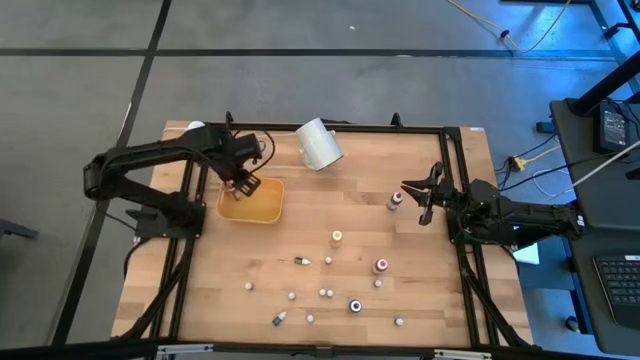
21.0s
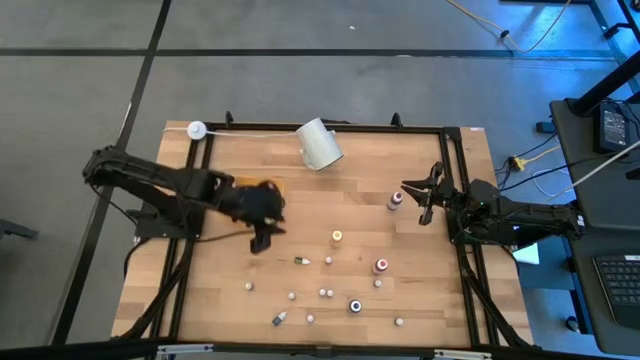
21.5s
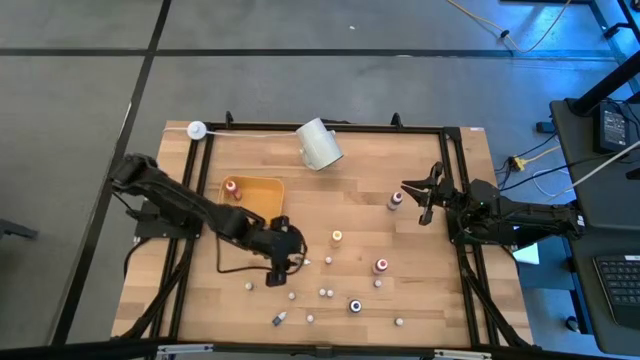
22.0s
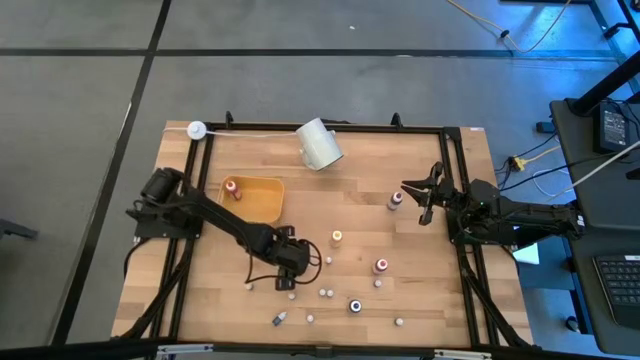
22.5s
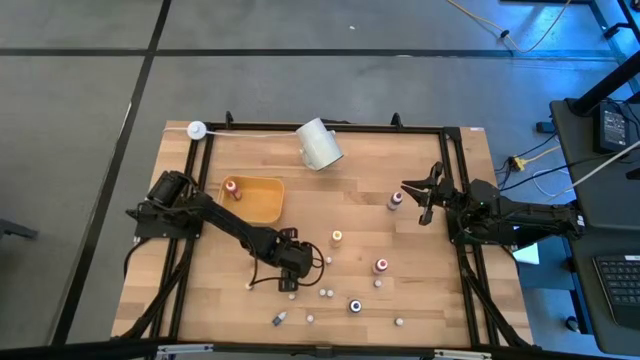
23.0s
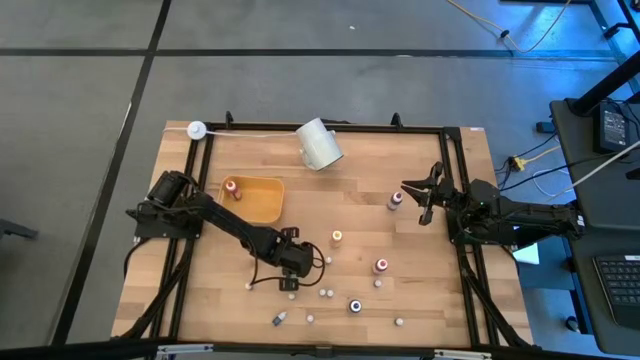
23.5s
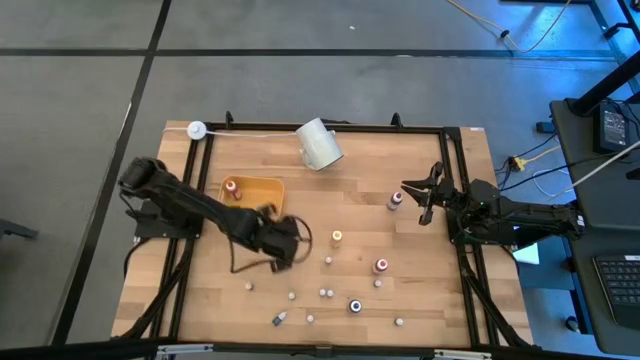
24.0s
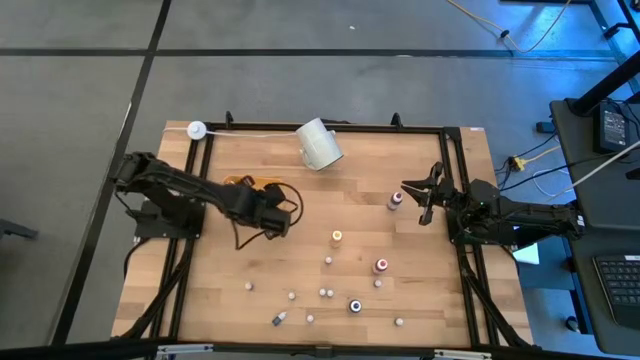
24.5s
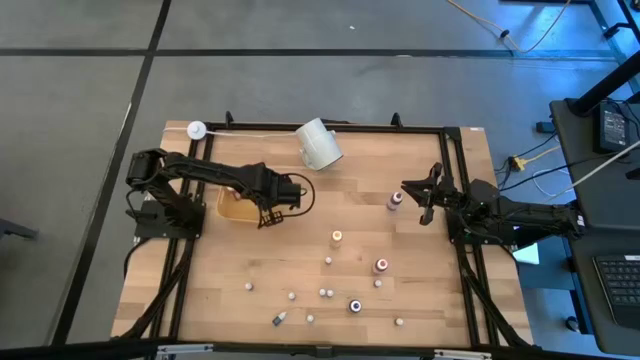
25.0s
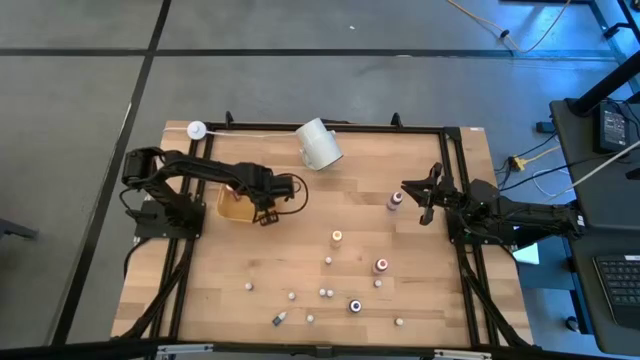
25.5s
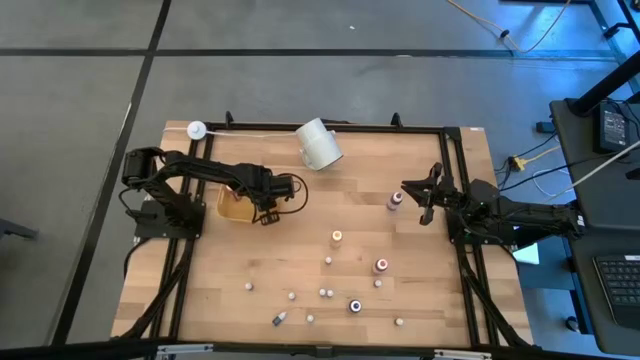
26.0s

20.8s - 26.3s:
Task: Pick & Place food coloring
Put the top small green food coloring bottle into the bin

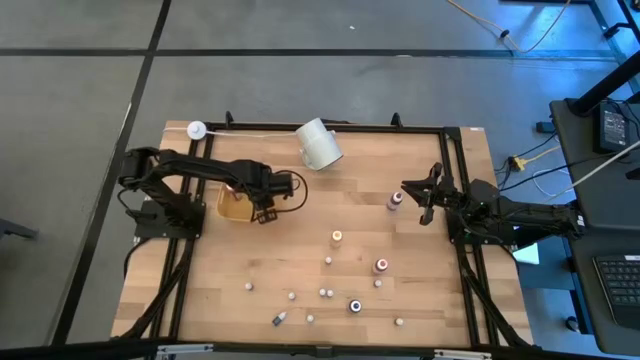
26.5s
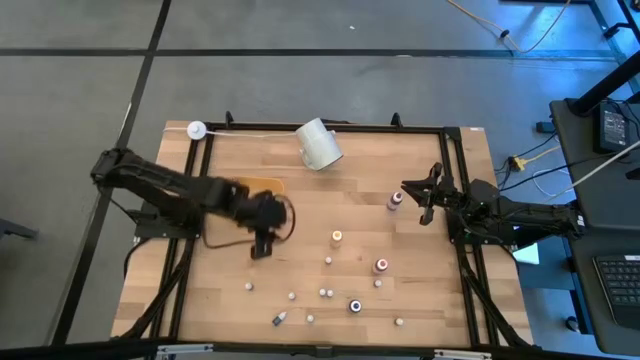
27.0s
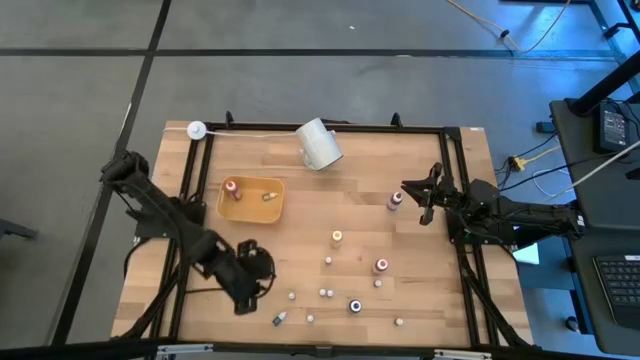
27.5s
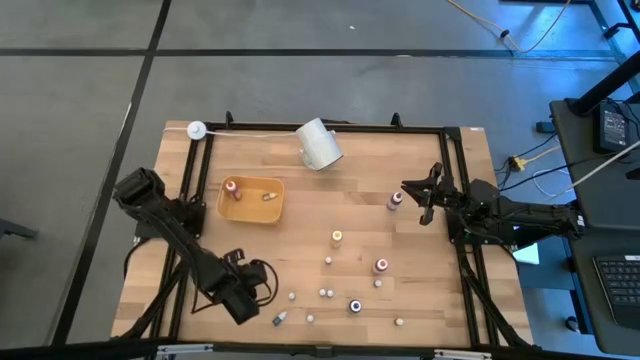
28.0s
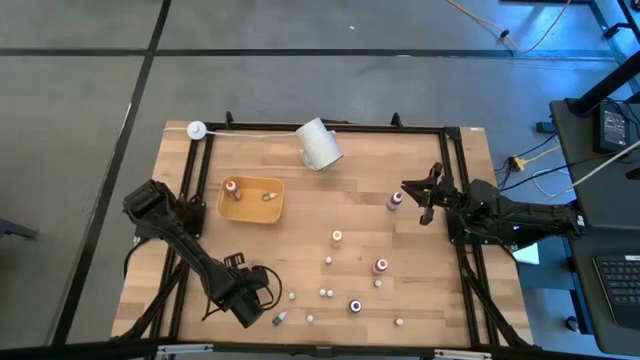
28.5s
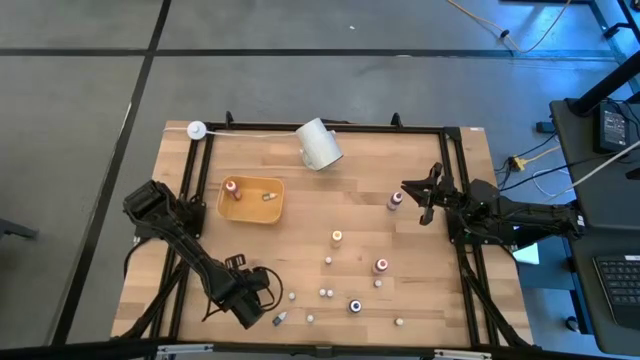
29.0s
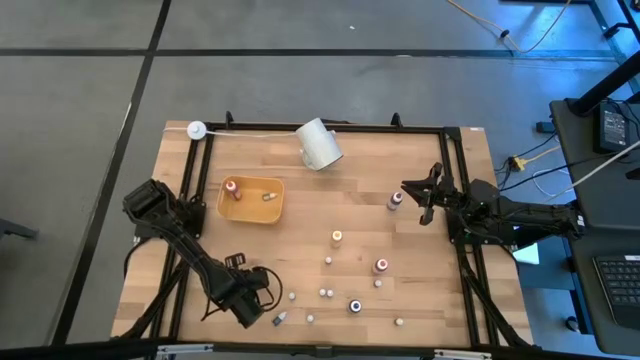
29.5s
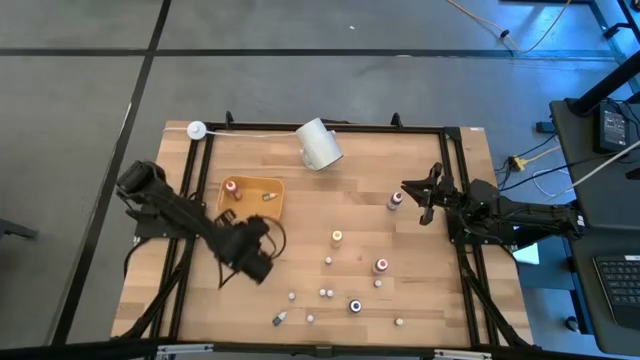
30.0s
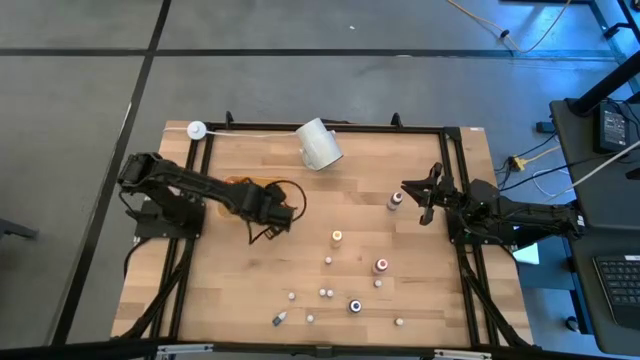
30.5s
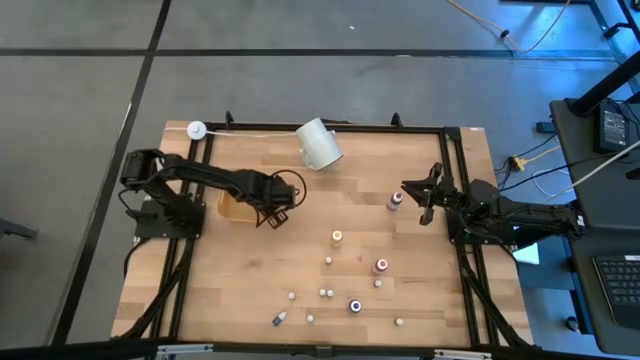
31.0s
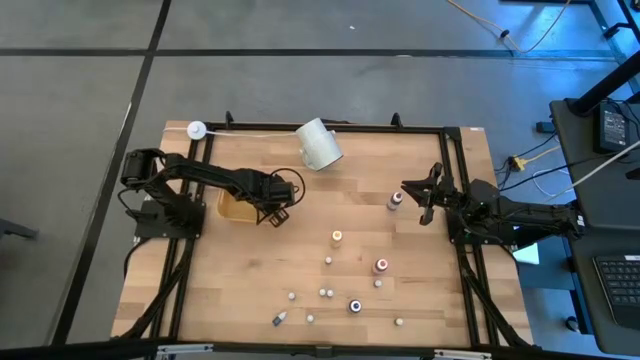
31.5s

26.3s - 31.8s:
Put the bottom small pink food coloring bottle into the bin

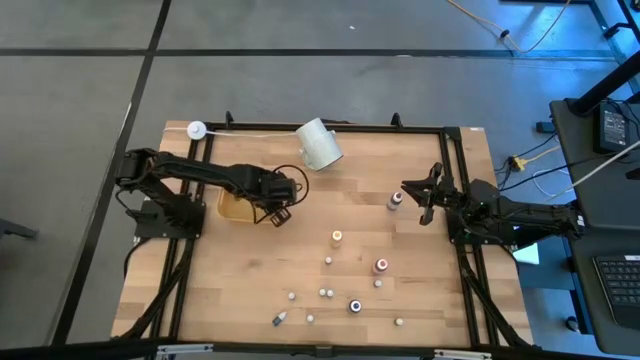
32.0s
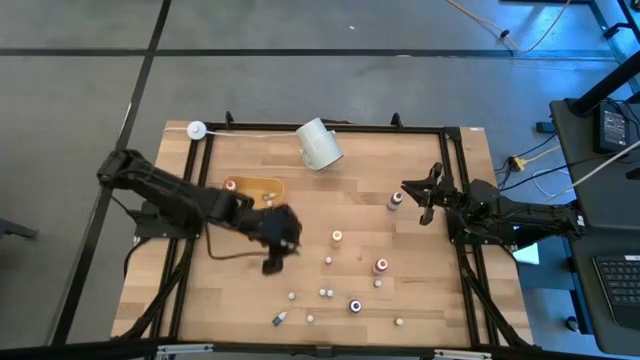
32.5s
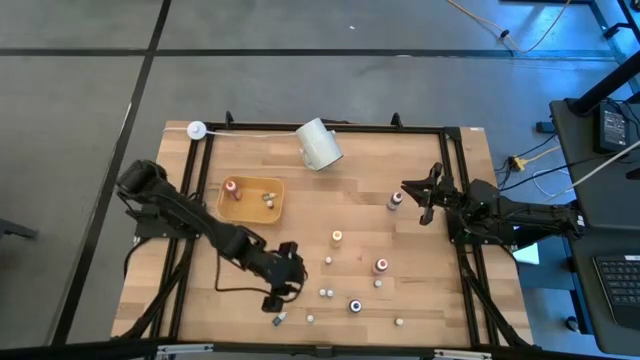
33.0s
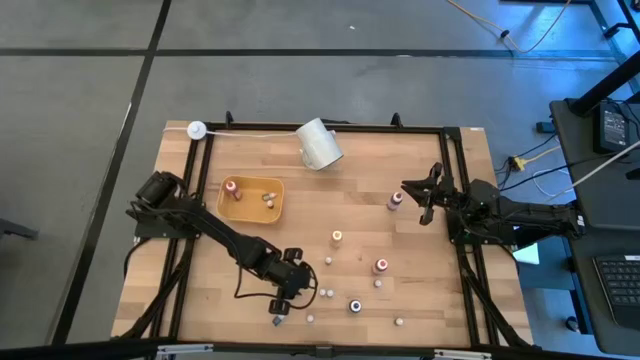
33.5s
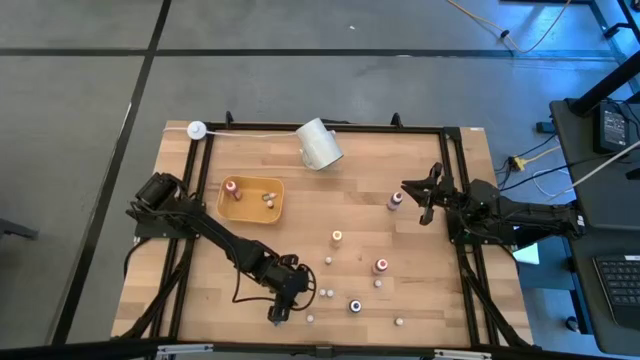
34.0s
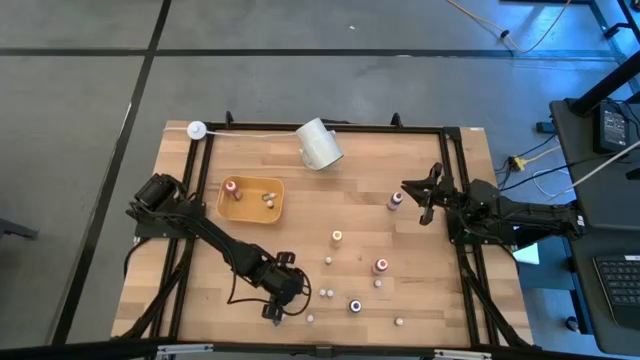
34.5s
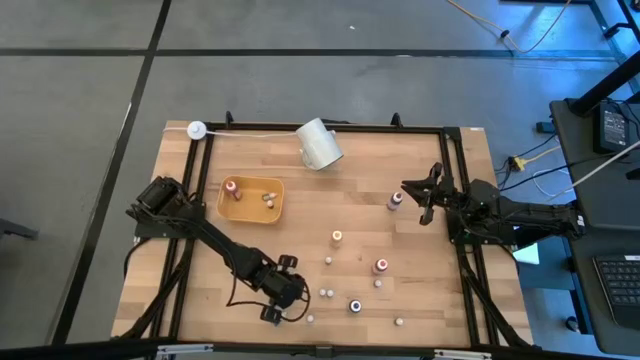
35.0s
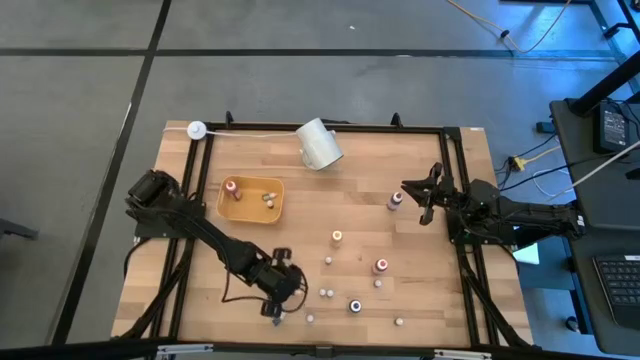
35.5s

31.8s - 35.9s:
Put the left small red food coloring bottle into the bin

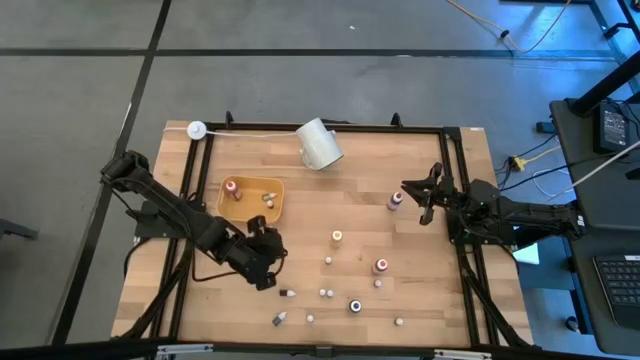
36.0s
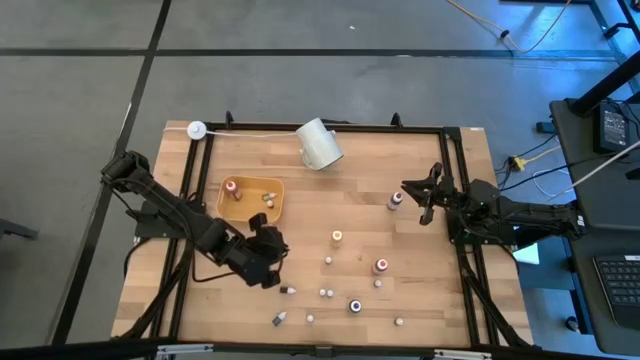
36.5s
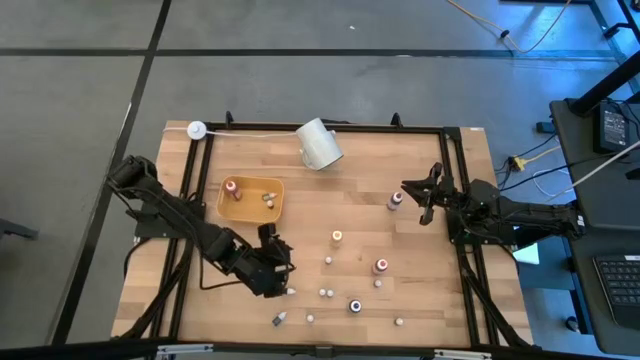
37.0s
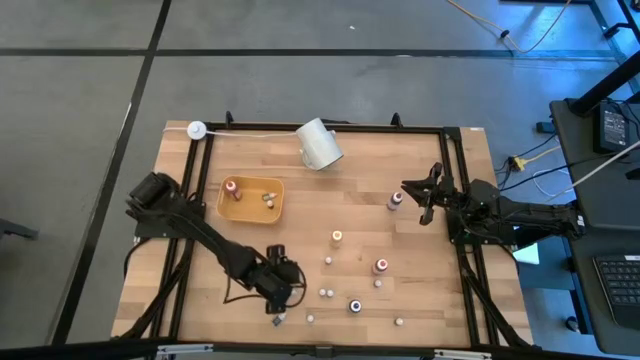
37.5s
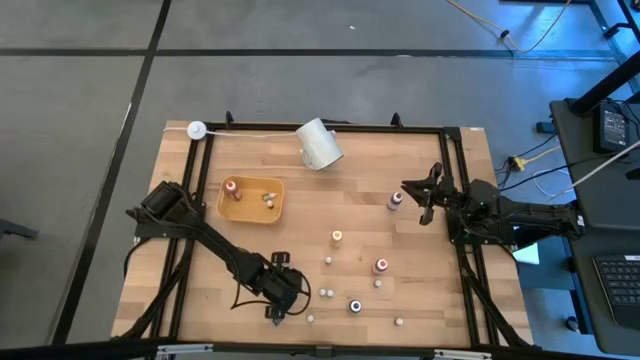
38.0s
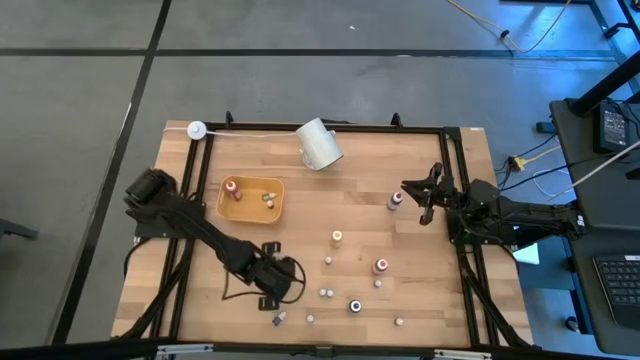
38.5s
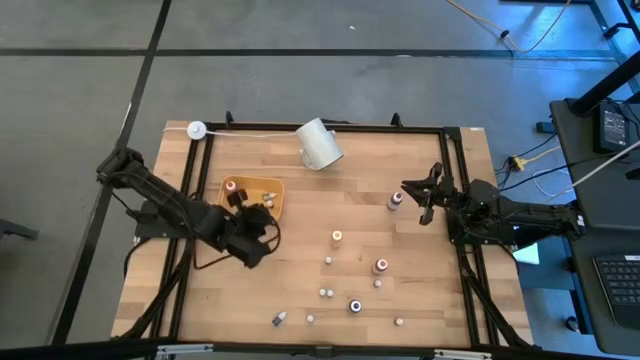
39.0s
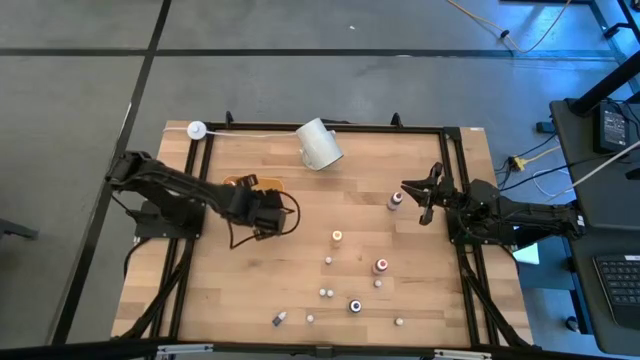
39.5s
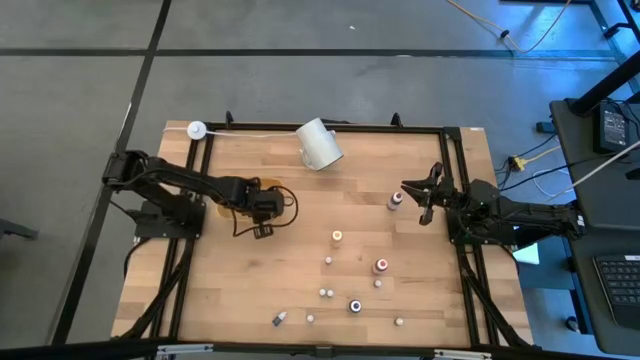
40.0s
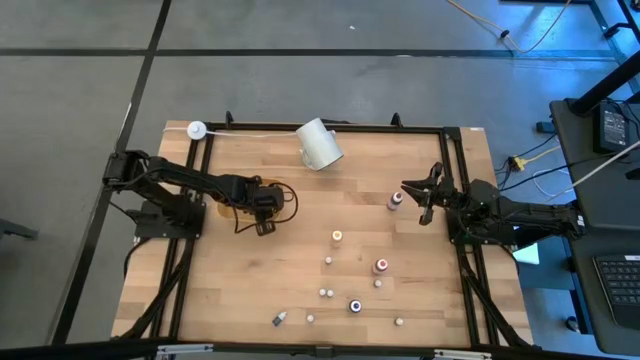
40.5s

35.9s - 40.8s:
Put the left small red food coloring bottle into the bin
